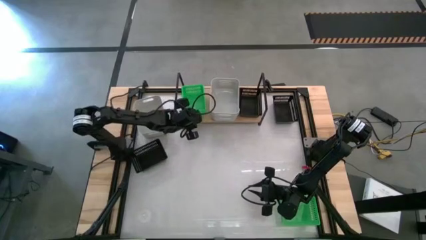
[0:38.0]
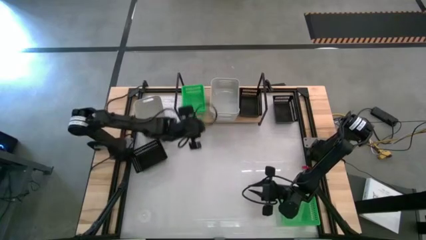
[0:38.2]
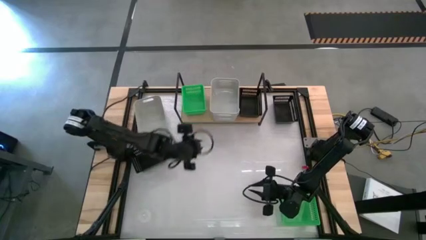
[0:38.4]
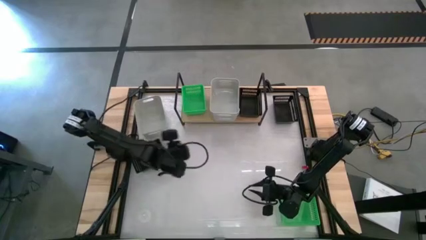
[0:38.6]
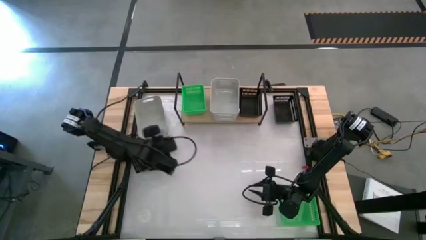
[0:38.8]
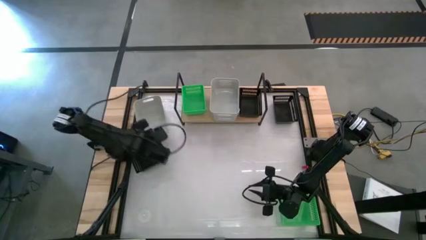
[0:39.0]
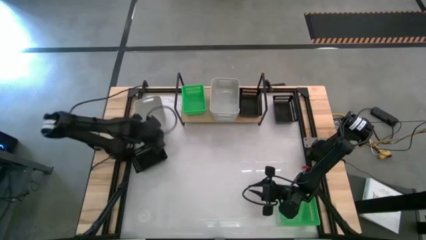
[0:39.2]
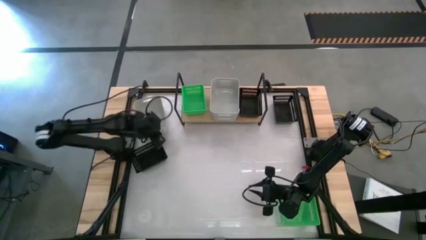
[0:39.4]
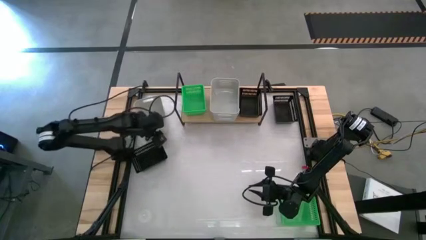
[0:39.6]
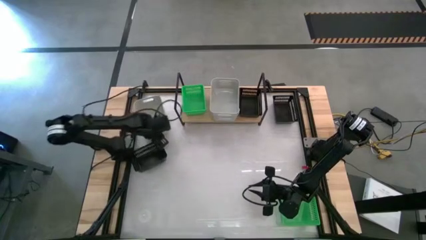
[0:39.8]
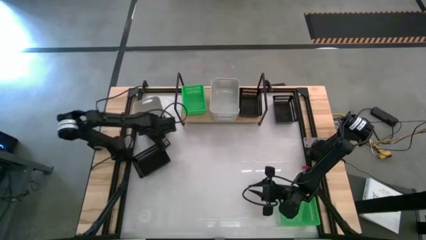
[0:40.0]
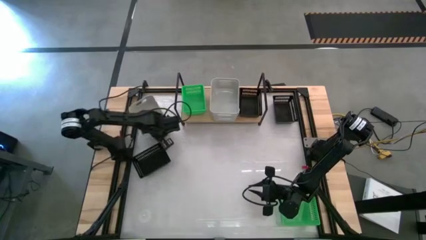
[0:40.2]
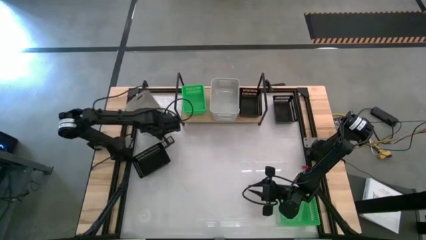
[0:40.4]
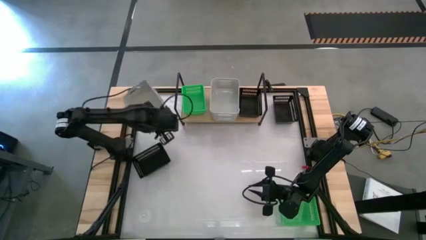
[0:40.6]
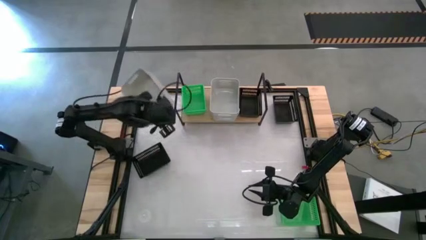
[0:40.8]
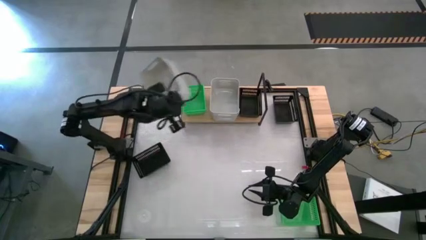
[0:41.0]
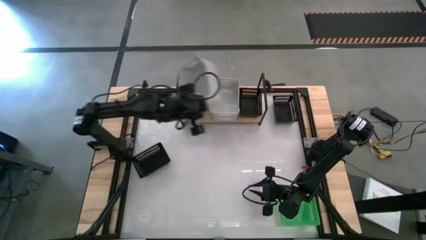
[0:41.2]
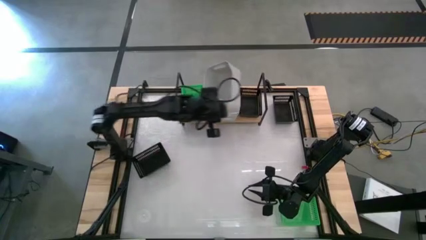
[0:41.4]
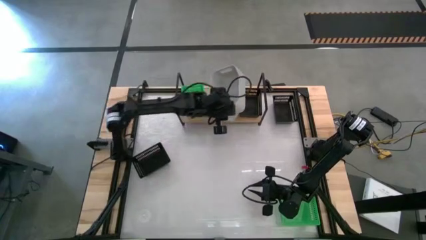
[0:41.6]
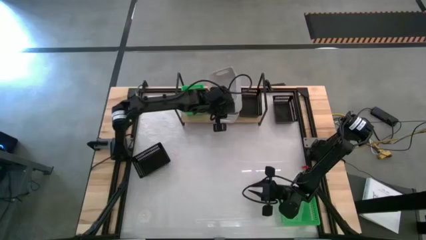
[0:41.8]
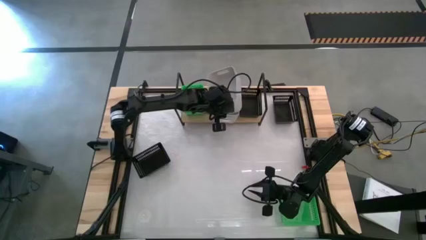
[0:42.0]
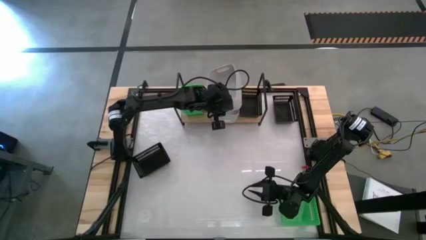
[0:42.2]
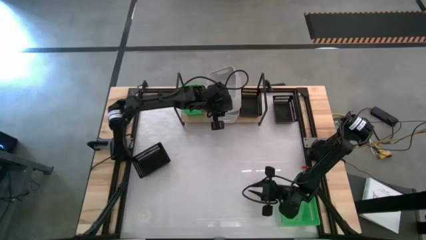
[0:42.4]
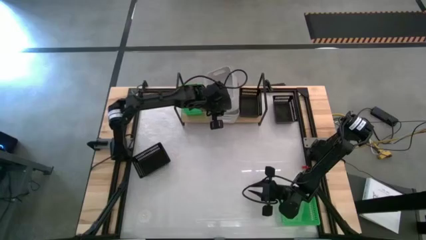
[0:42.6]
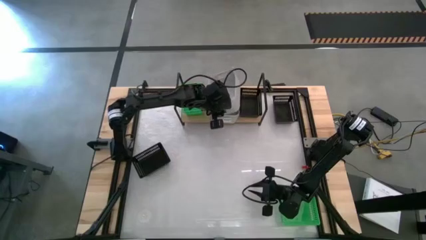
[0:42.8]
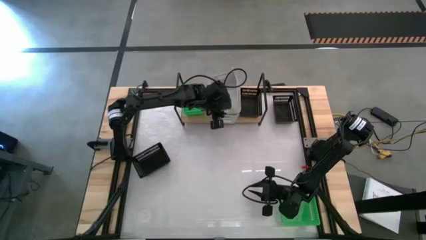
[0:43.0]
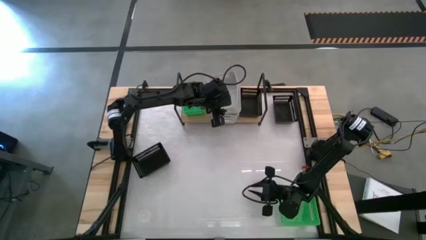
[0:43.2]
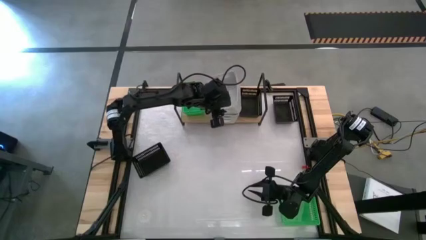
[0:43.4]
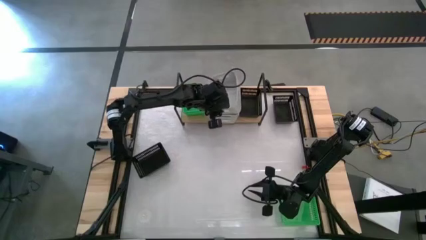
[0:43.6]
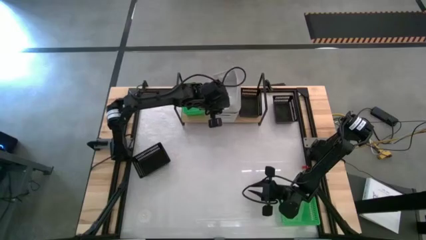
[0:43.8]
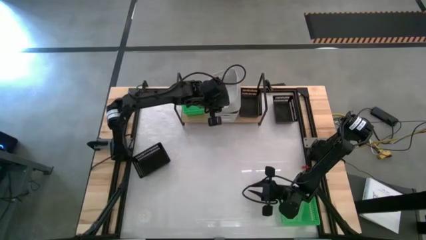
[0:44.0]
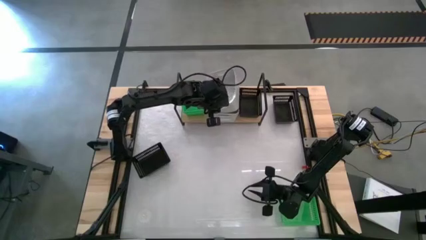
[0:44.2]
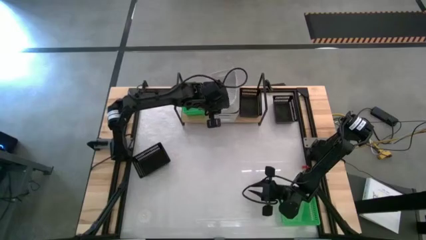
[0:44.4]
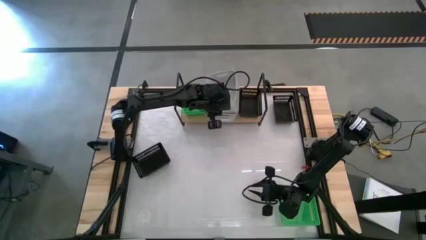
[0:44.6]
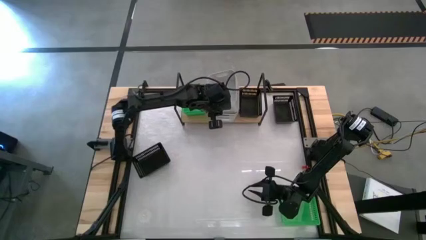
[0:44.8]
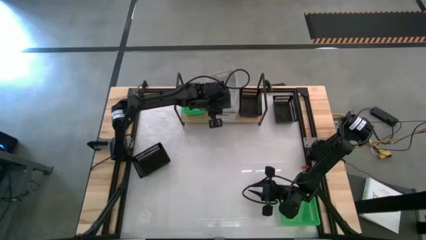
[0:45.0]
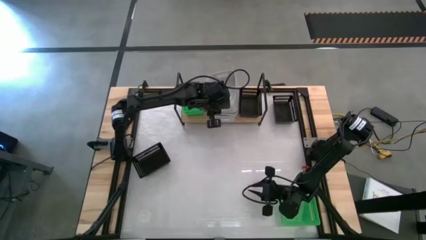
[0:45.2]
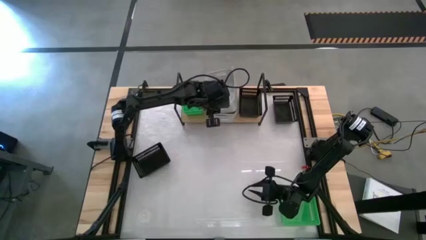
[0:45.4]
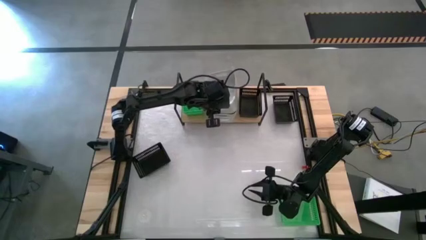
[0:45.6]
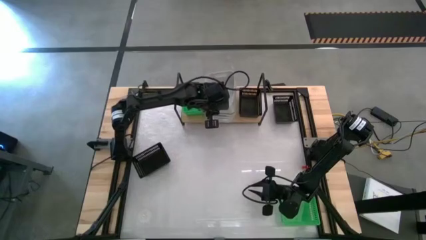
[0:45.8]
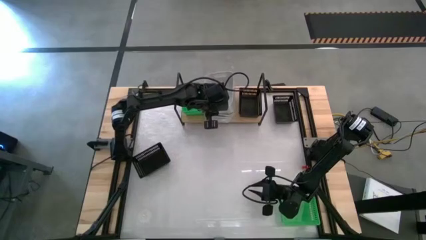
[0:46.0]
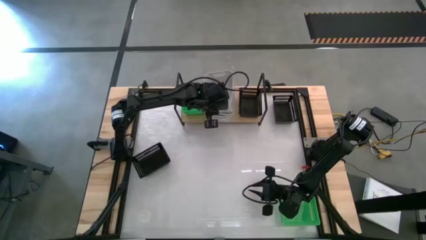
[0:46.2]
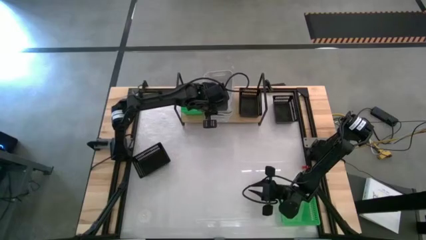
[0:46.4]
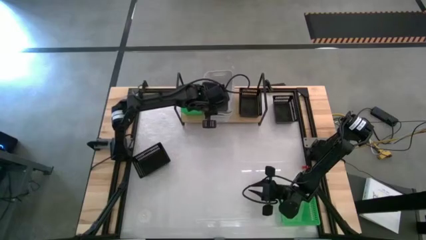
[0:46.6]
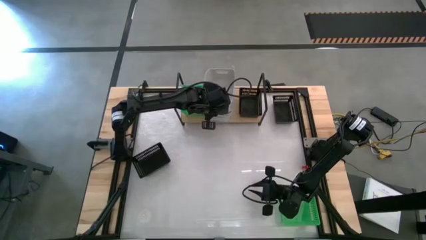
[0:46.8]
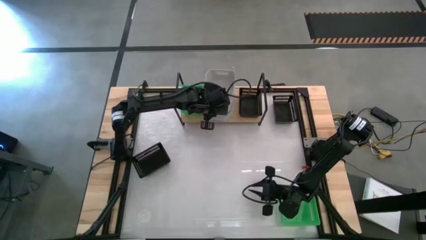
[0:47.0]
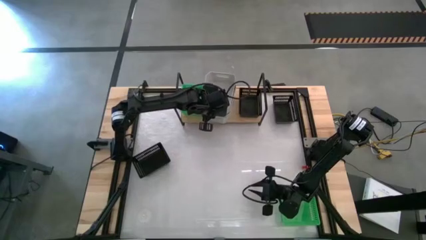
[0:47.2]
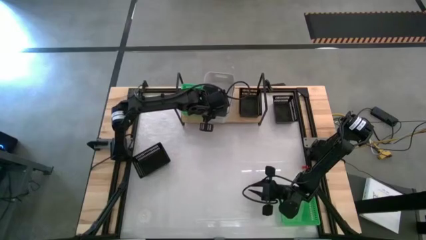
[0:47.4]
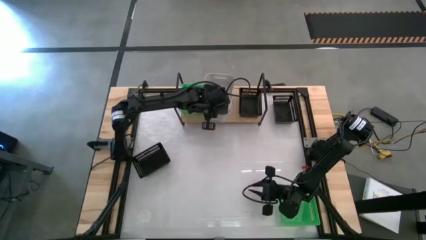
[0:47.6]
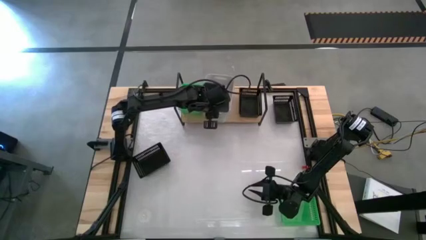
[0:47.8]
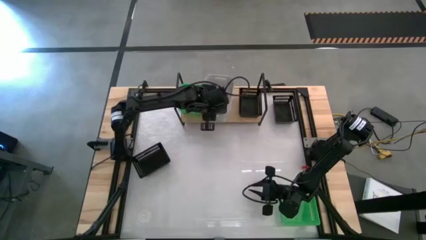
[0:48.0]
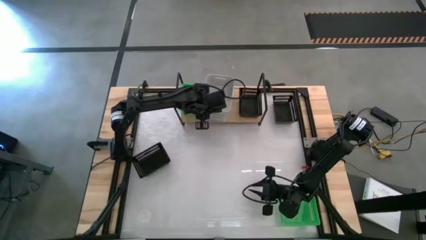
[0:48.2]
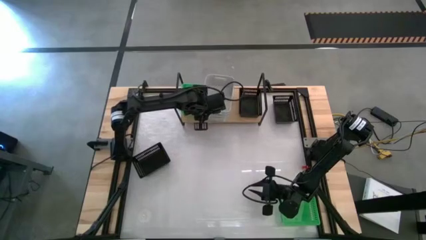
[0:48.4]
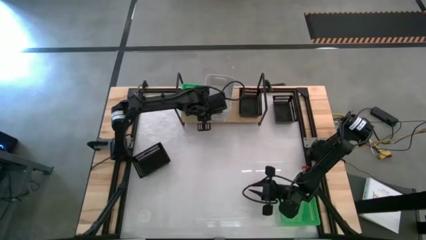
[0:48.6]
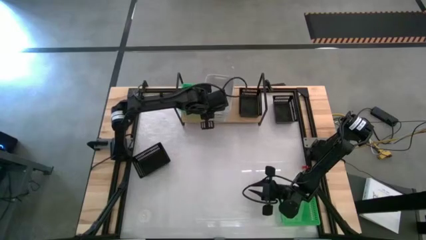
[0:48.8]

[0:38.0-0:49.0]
Task: Stack baskets on shelf by color
Stack the white bin on the stacked white bins on the shelf

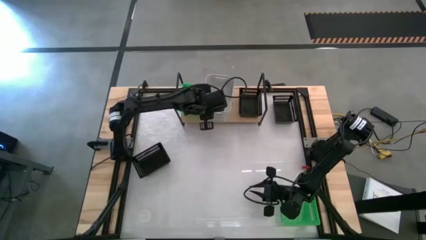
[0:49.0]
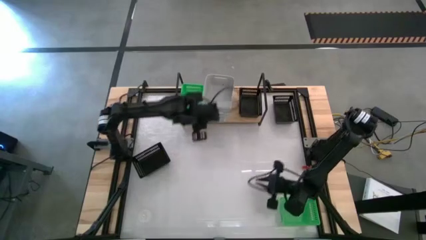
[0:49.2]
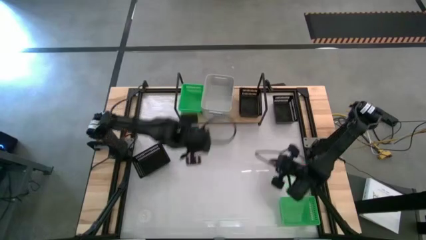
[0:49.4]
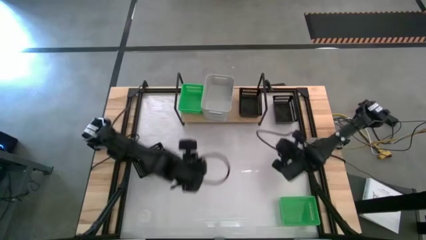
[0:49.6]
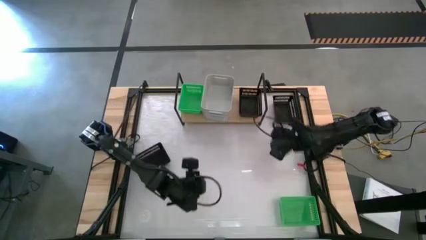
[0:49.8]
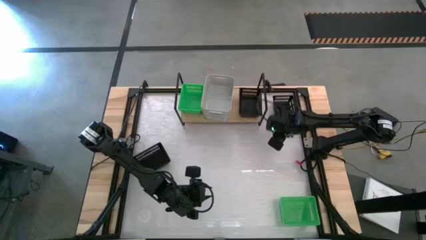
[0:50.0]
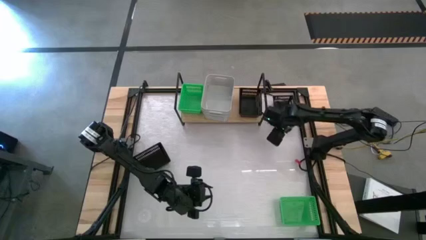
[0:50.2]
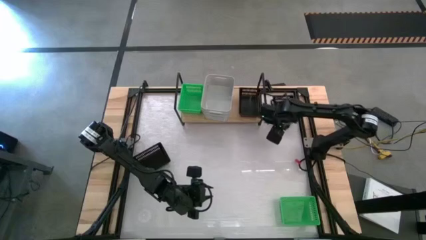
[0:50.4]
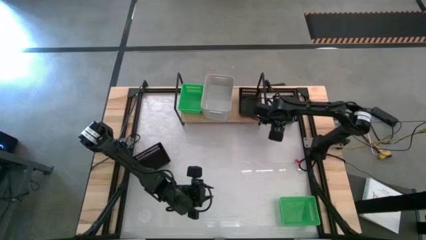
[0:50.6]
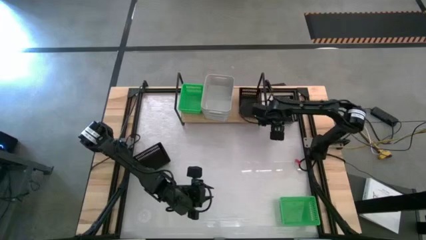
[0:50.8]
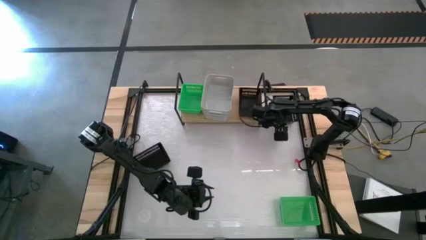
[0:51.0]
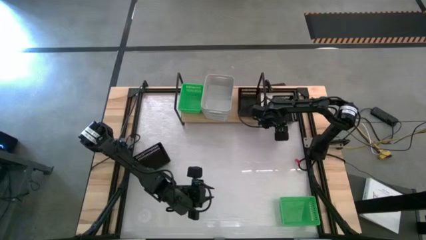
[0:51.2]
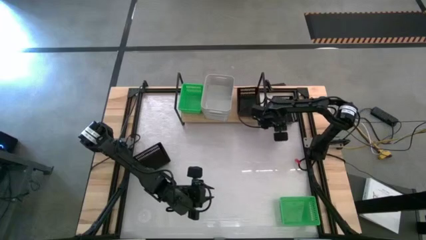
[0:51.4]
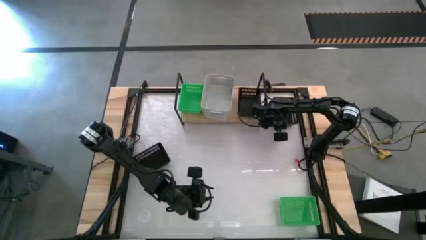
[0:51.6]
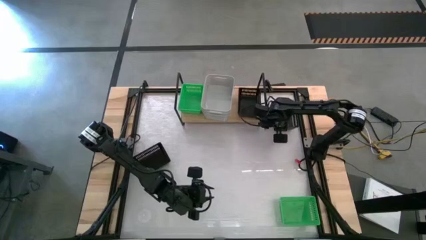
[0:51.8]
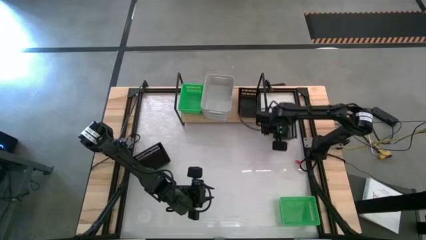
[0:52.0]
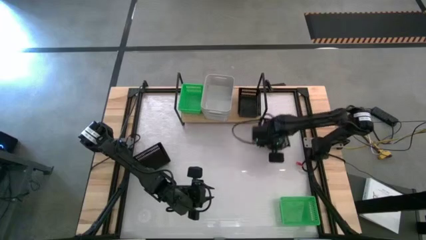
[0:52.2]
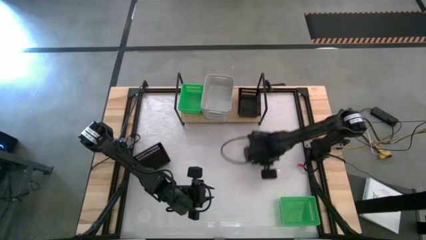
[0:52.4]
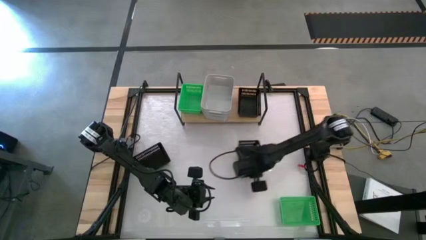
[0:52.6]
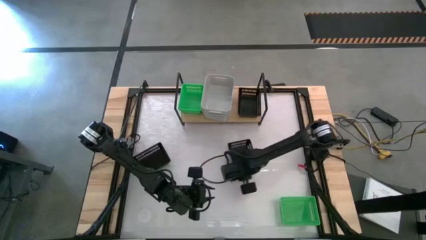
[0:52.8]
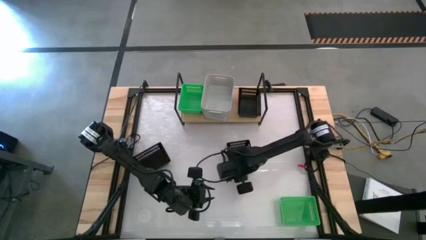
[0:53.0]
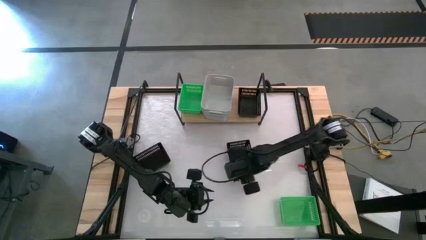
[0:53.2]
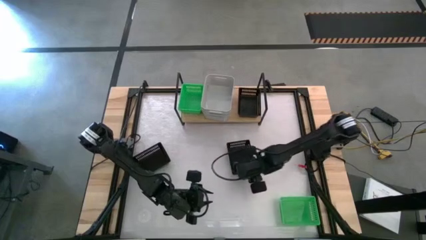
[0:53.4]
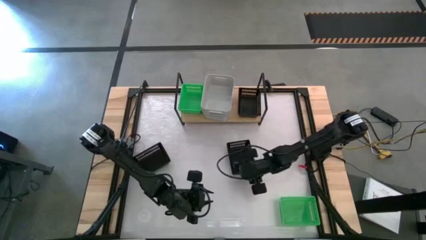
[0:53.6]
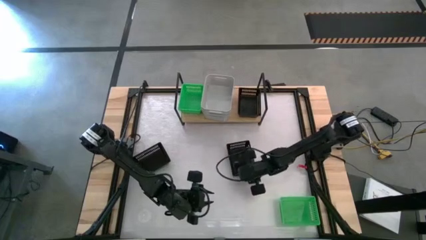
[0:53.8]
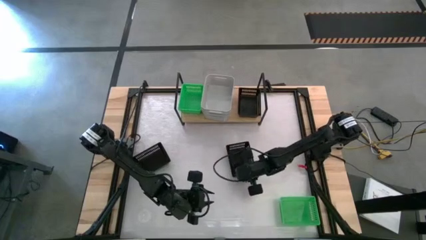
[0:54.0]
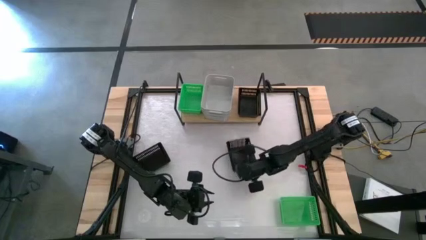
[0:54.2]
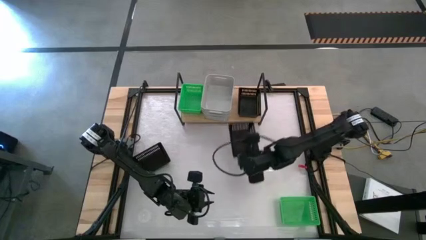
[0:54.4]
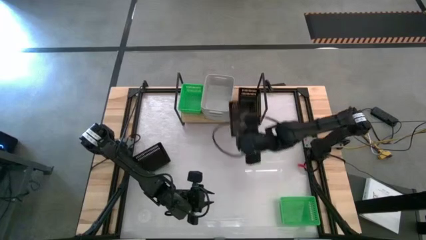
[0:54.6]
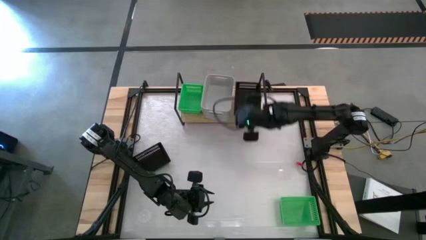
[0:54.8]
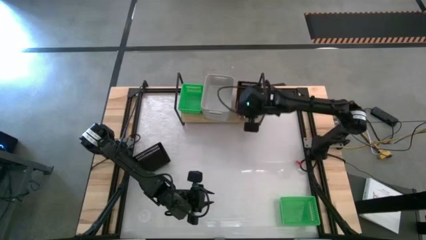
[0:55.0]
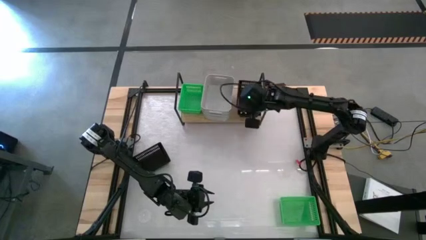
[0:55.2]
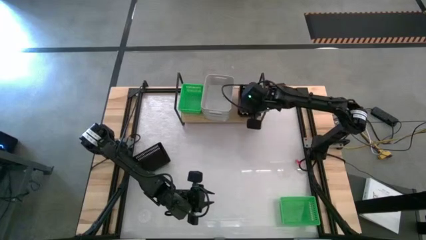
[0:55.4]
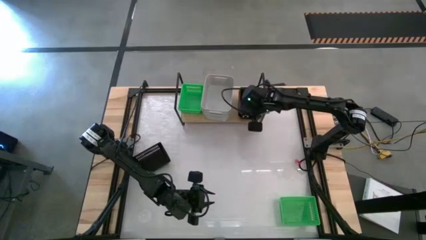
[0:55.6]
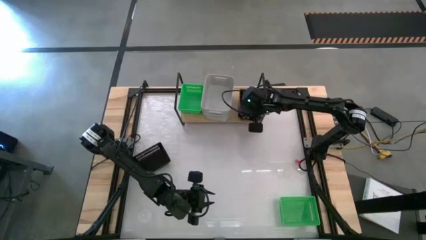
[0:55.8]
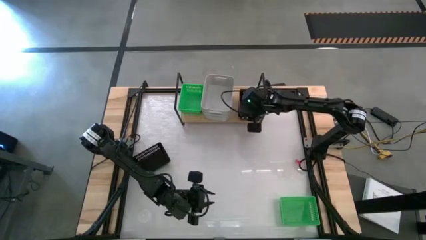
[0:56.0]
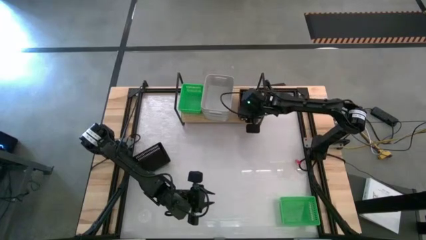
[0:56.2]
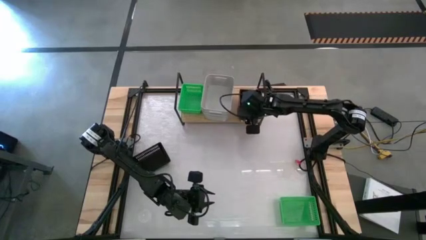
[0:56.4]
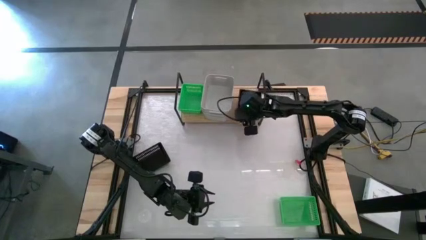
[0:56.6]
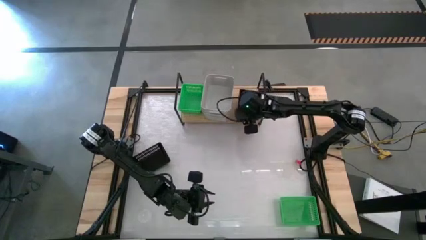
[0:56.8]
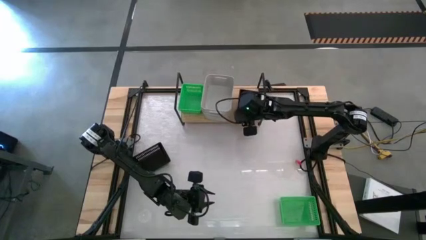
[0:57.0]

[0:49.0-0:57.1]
Stack the top black bin on the black bin on the shelf
